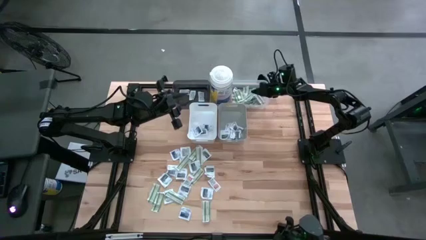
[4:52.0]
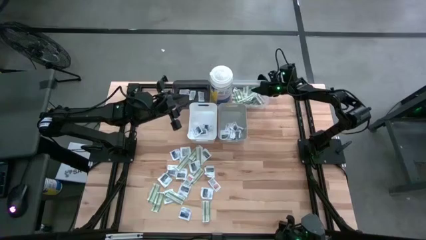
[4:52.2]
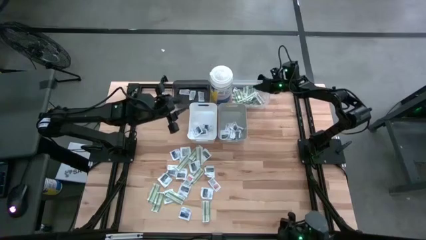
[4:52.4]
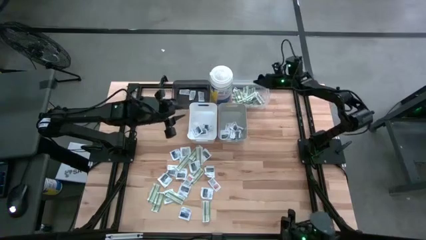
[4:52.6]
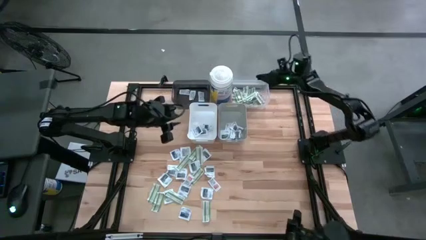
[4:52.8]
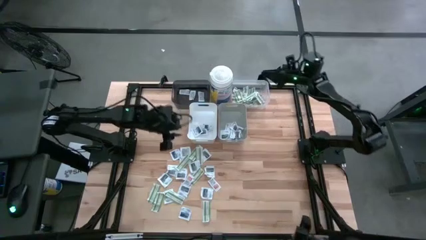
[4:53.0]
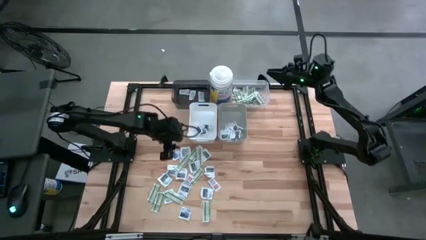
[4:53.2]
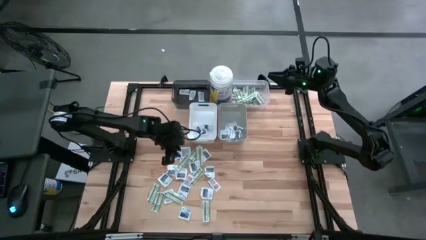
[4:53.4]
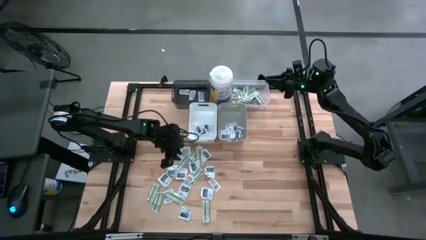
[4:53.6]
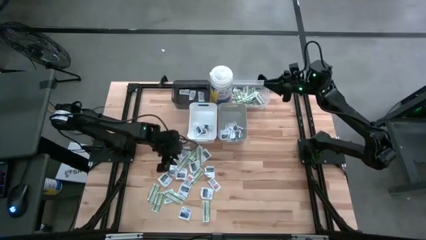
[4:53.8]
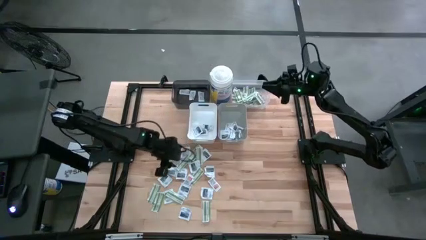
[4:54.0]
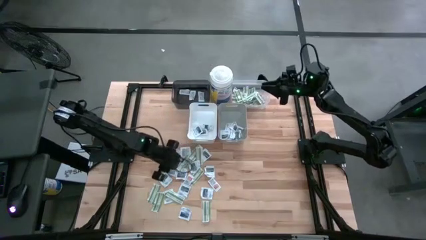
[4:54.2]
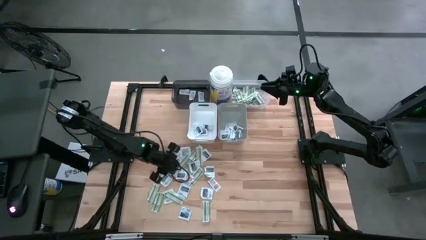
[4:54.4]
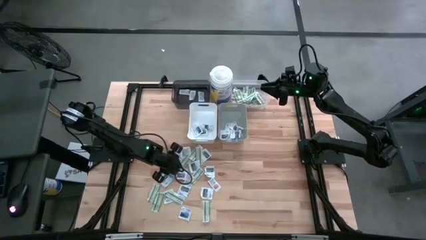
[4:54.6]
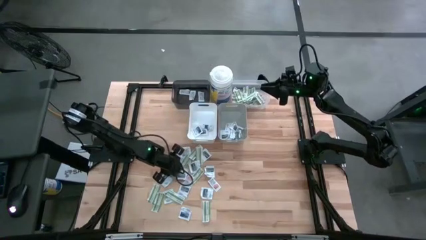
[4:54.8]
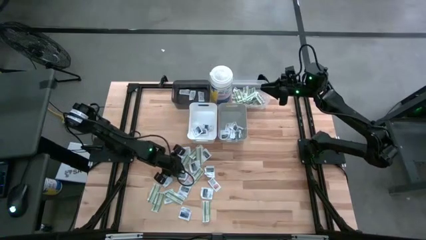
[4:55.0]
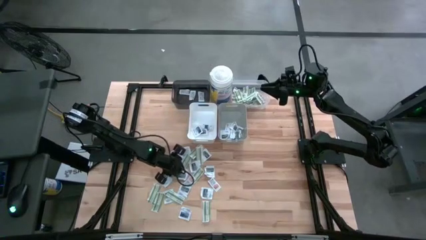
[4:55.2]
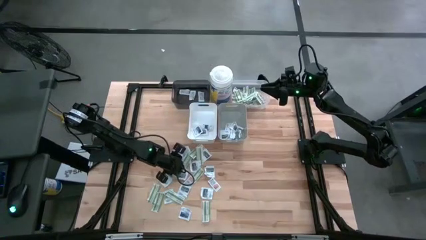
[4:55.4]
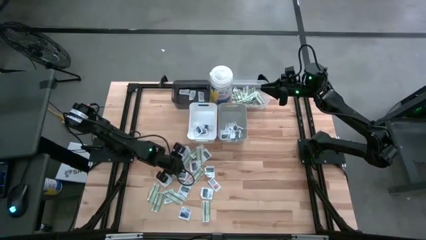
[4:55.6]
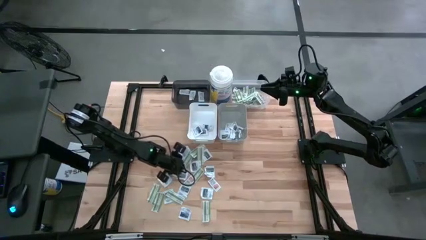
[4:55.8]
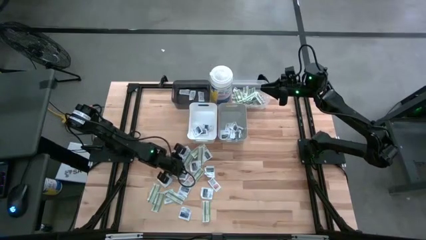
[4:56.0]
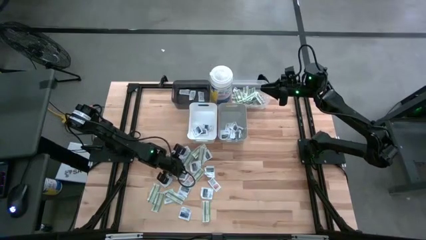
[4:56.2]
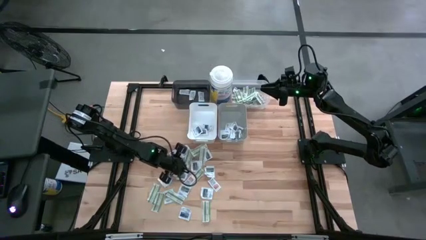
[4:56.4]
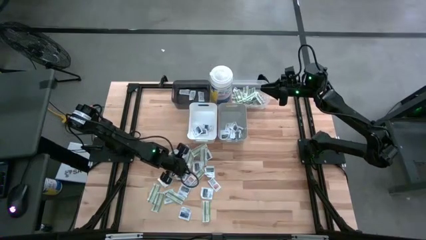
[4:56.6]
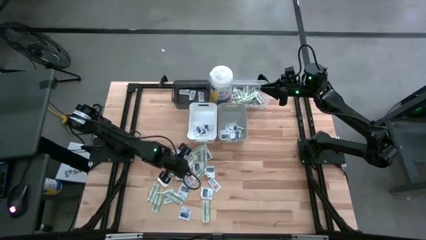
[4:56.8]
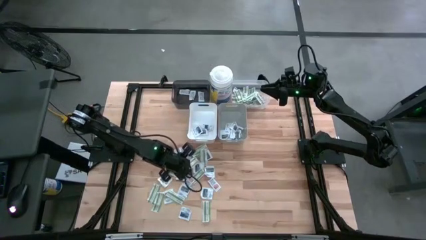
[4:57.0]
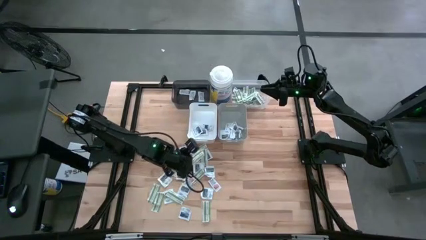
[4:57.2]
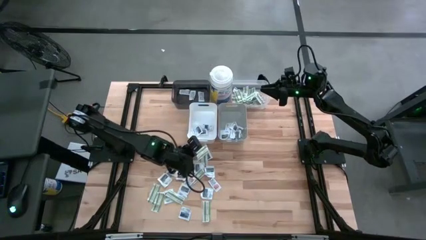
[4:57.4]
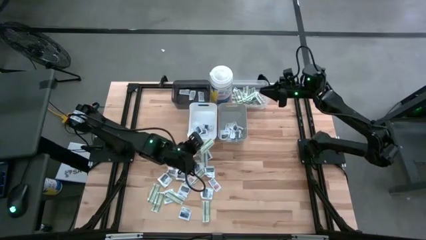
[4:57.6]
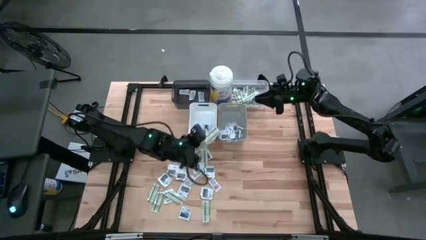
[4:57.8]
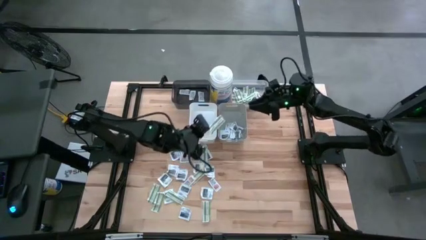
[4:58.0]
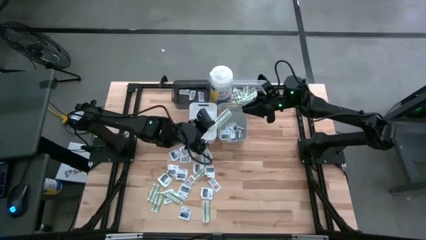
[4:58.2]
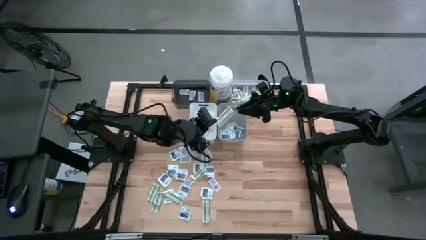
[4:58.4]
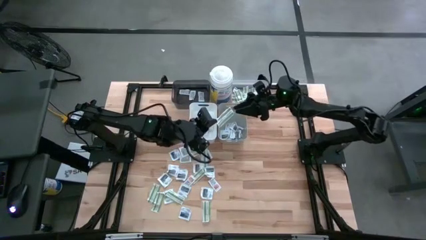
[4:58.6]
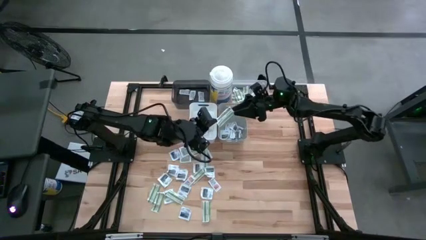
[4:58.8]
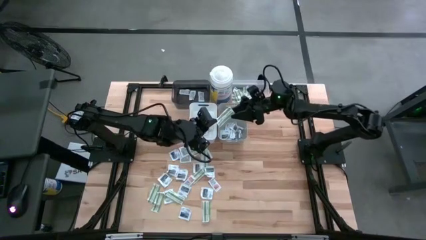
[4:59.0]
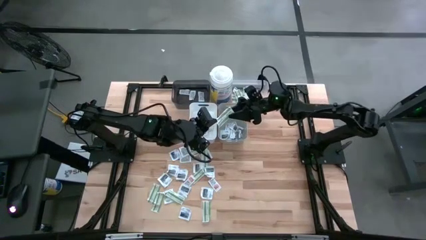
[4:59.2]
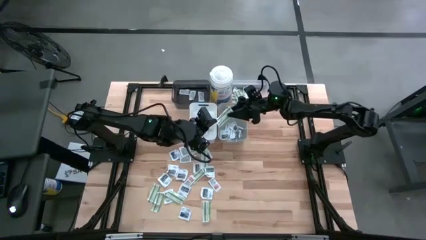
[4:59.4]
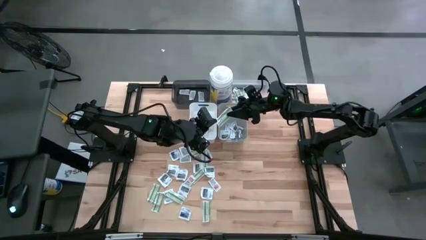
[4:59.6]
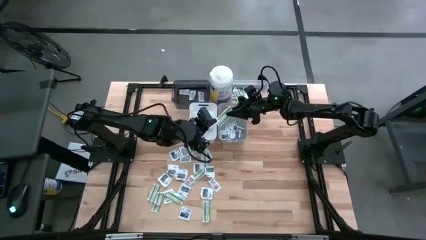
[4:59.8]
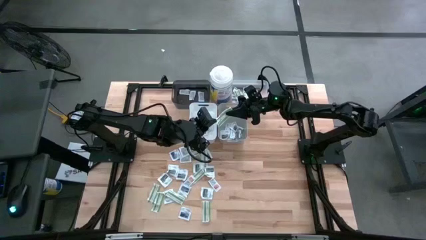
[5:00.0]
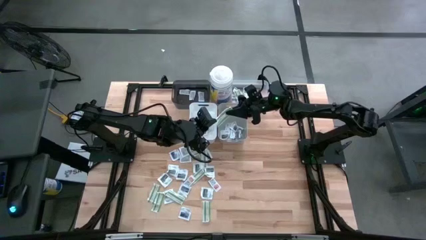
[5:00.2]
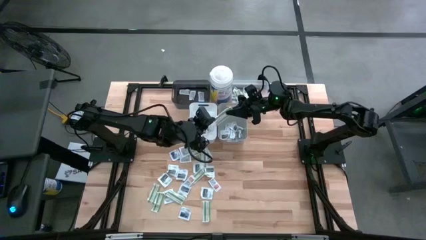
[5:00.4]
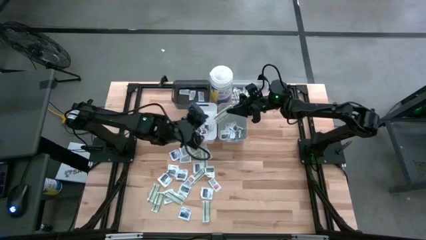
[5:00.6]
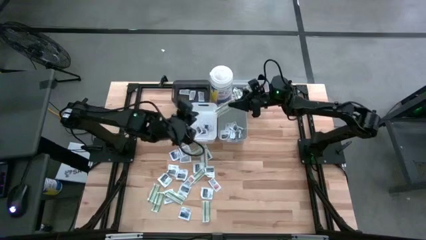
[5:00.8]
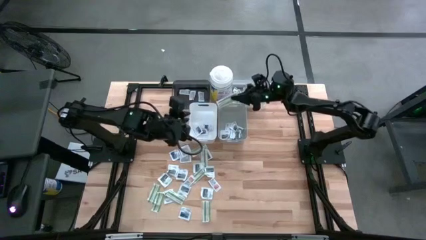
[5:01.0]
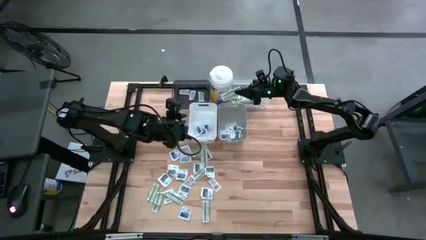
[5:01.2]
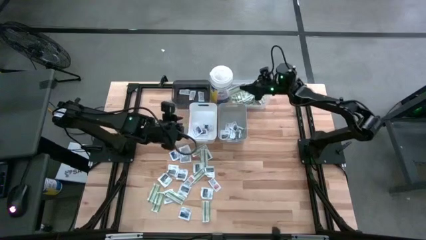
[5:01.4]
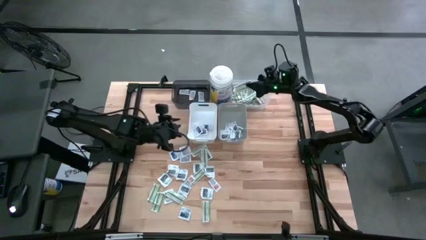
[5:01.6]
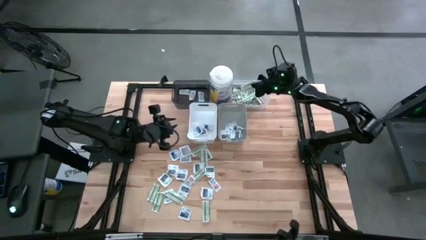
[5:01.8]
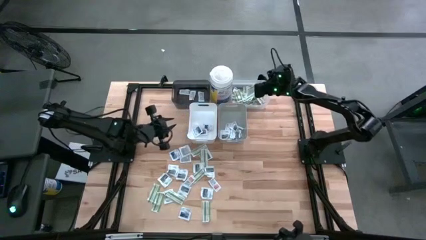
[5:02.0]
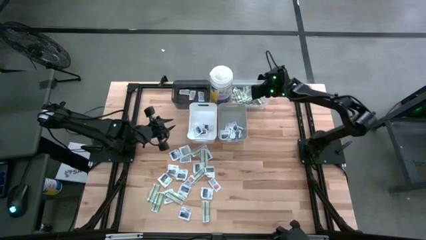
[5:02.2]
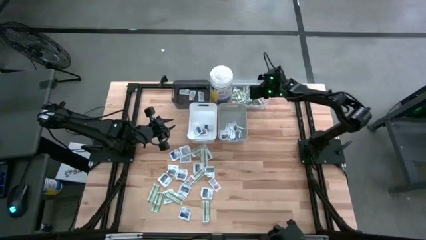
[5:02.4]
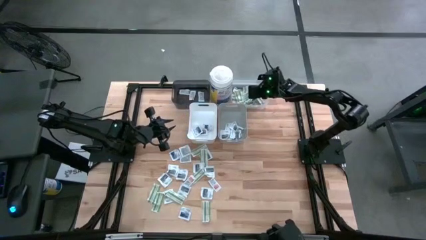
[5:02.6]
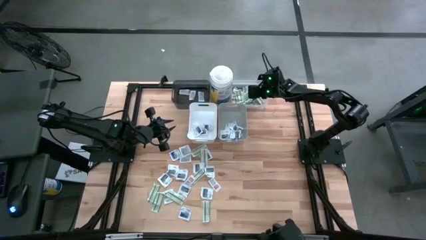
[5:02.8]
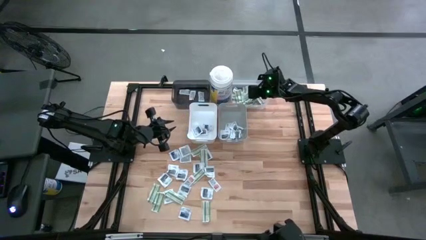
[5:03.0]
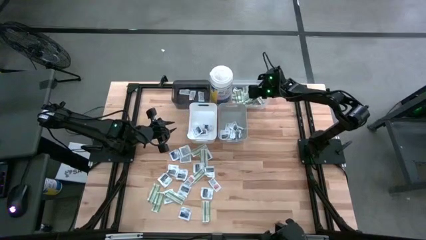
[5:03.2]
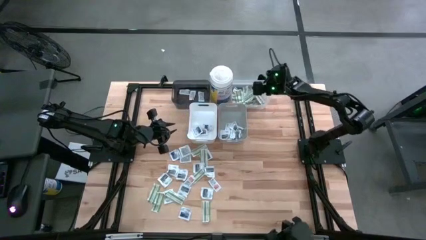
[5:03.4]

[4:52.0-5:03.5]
Task: Pick & Place First Aid Supplies
Put the band aid into the transparent bin
